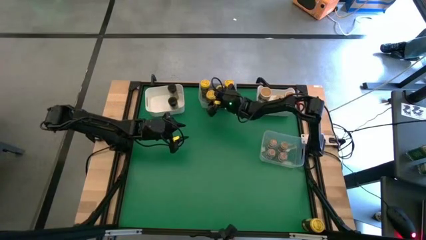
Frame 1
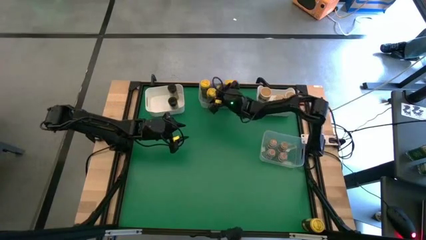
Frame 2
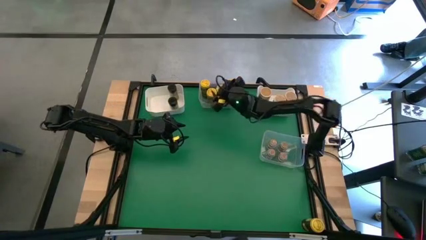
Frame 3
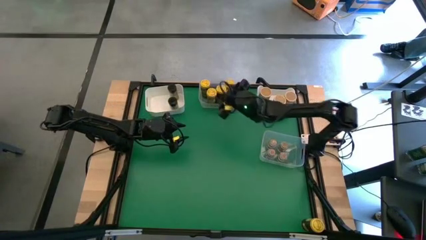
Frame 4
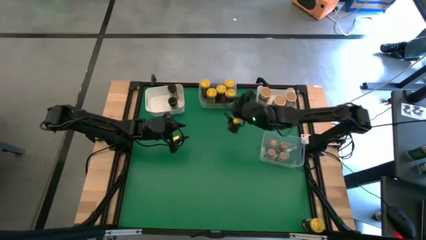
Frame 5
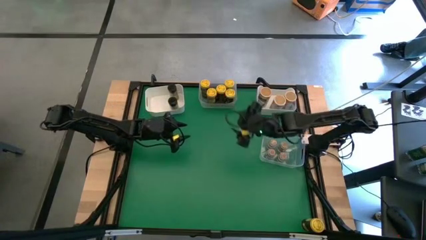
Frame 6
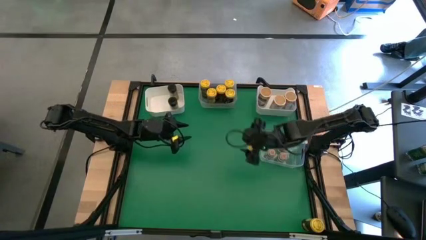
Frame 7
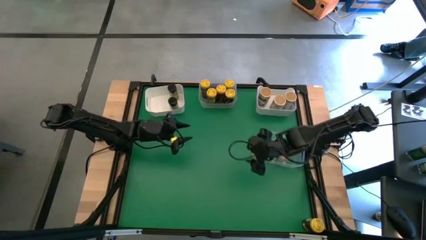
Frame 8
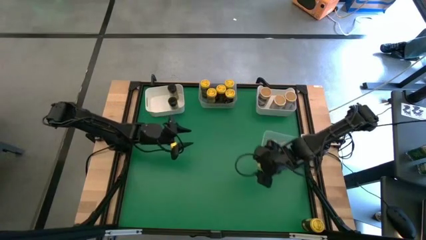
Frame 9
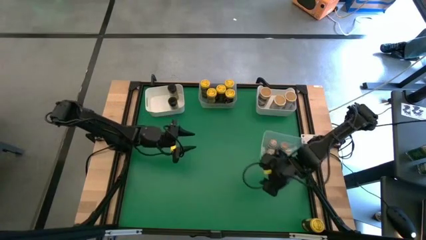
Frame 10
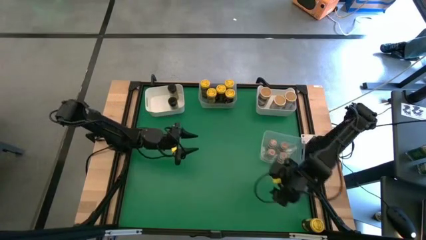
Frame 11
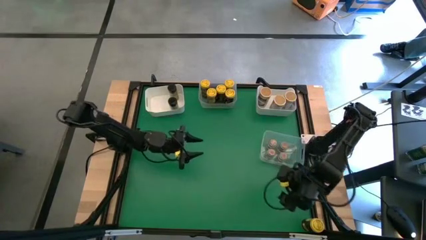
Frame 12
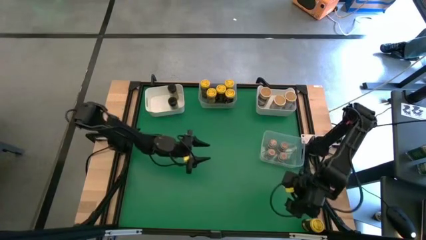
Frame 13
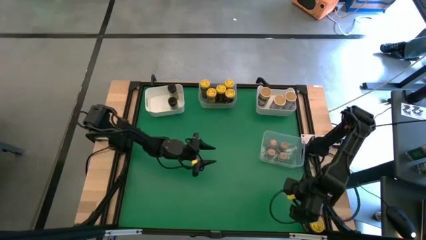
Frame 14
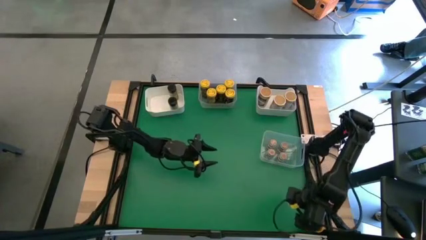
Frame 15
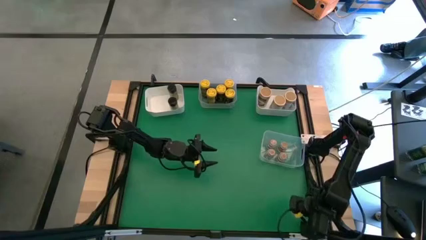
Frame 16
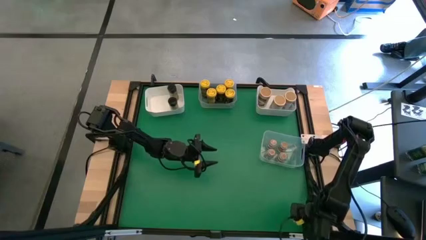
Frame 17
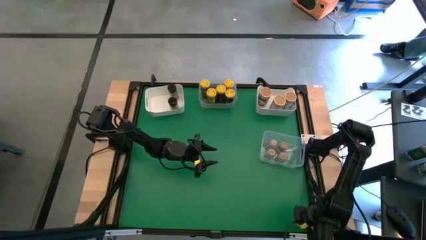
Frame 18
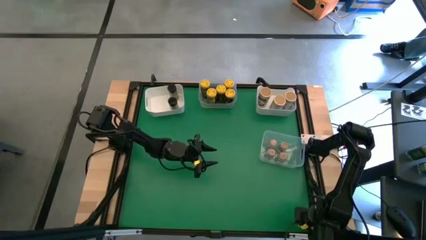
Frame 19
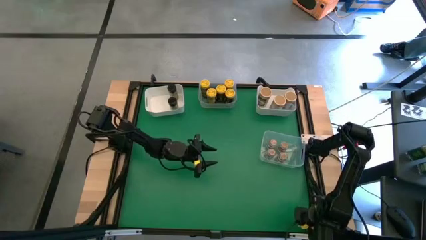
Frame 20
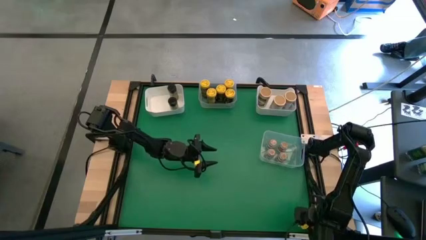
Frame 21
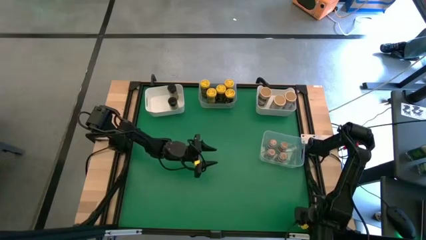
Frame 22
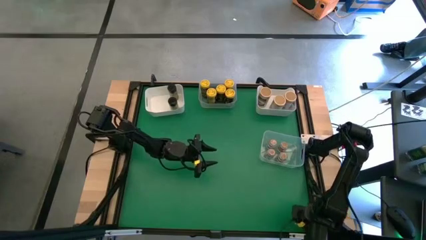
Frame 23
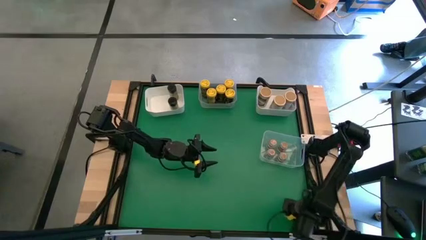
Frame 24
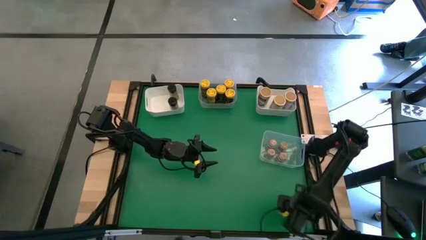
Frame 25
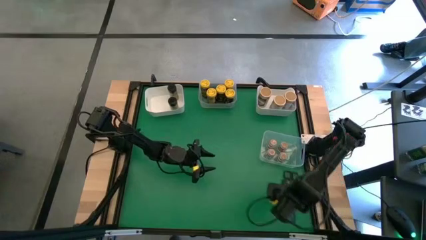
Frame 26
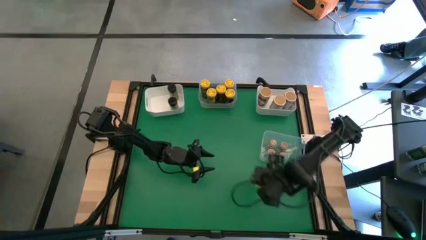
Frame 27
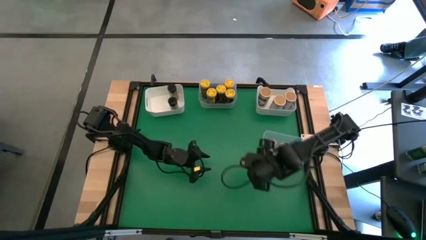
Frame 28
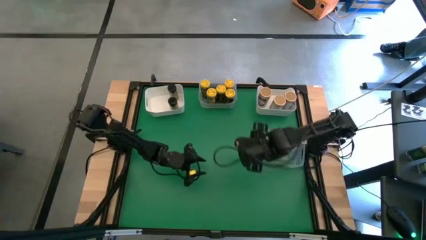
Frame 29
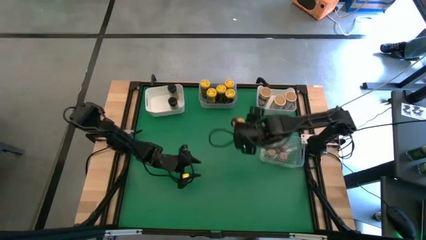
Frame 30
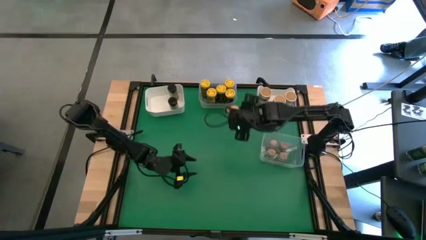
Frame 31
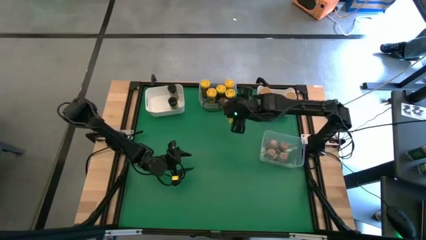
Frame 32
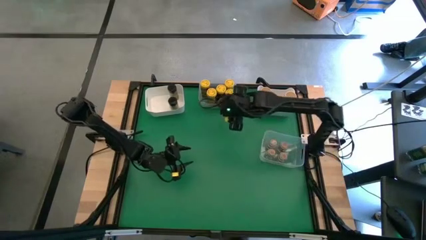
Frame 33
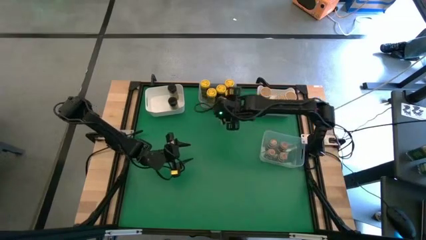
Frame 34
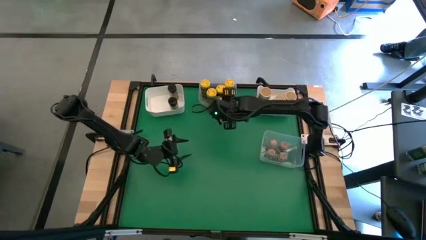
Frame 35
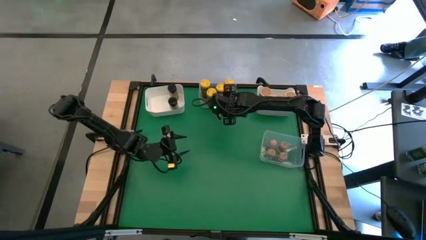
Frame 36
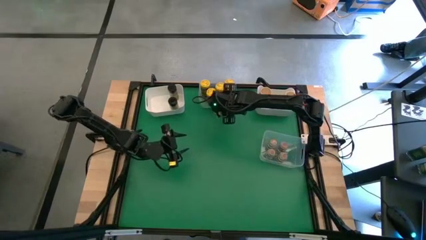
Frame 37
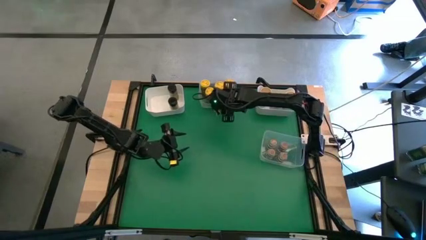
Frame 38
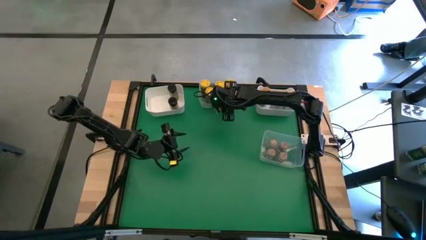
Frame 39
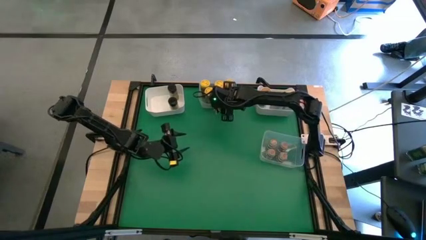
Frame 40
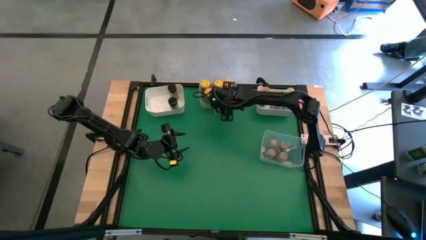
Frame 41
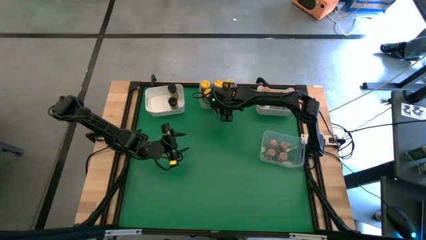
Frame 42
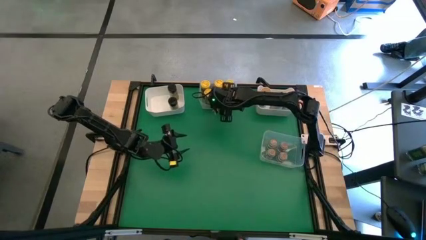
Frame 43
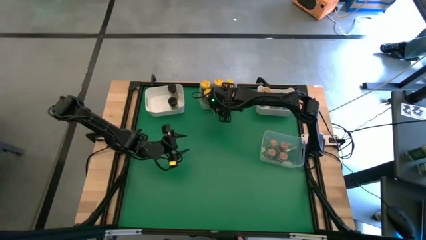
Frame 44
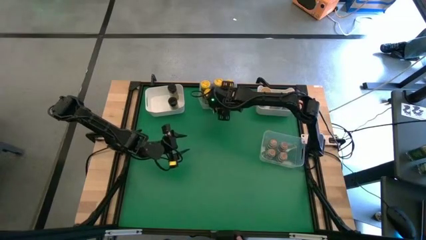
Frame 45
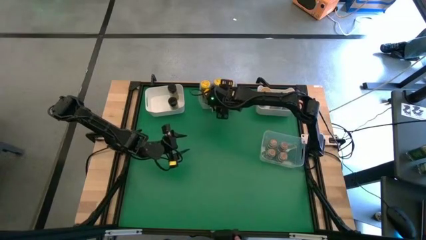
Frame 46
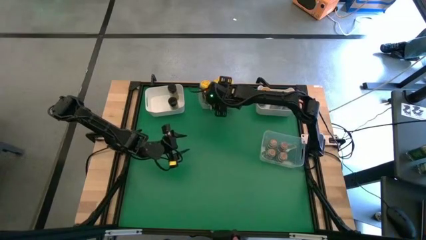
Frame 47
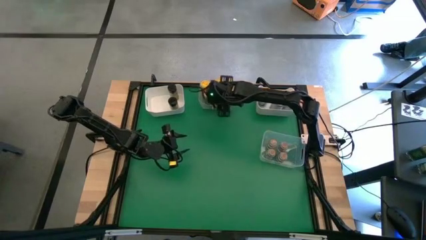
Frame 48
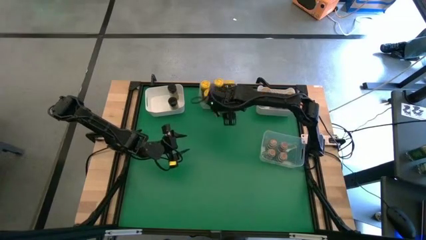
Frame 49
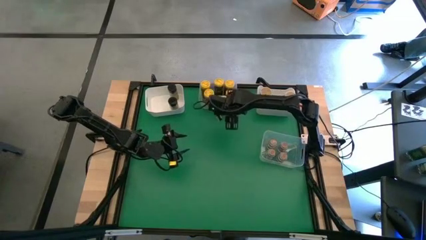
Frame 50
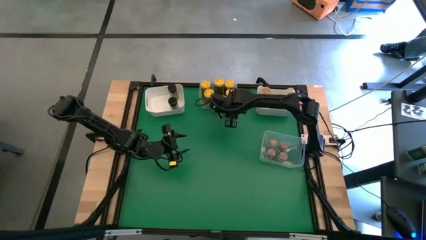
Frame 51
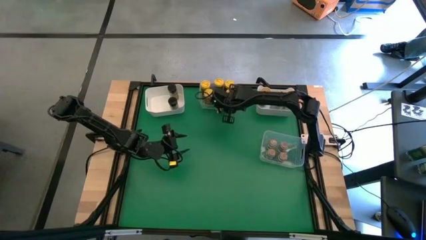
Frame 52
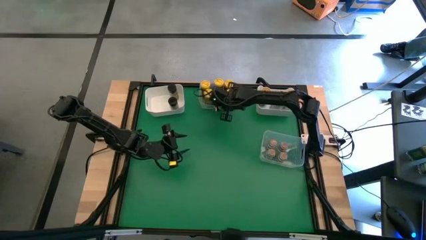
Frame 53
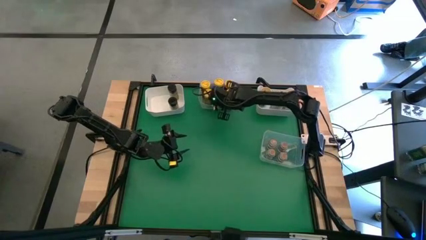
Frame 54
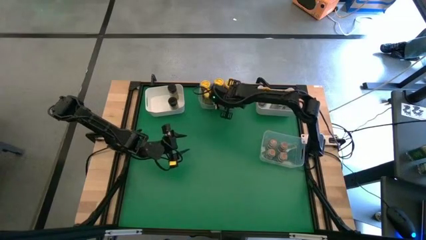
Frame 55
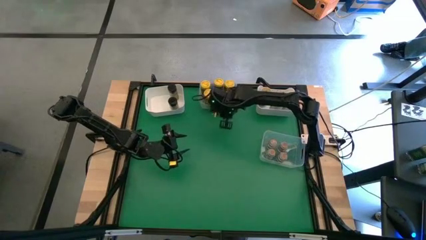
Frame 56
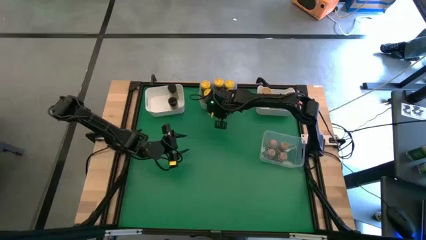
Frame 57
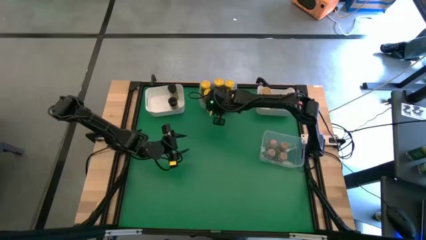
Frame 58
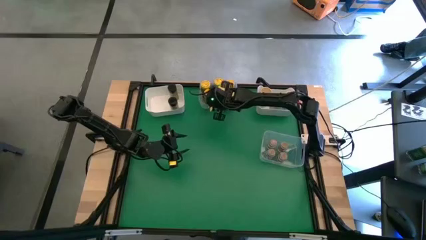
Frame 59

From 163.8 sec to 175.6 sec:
Task: Sort spices by type
Put the yellow seasoning bottle into the top transparent bin

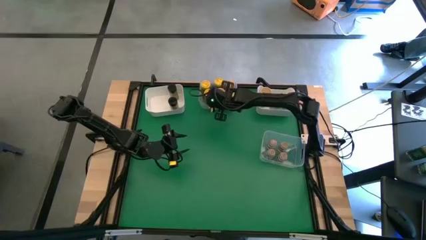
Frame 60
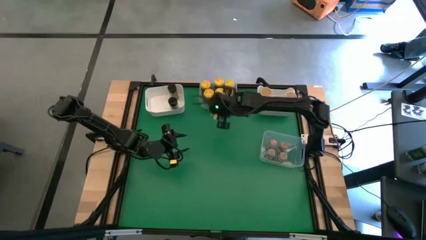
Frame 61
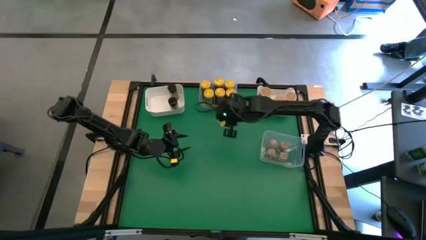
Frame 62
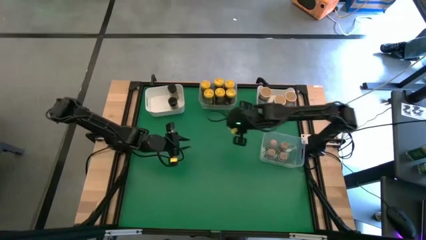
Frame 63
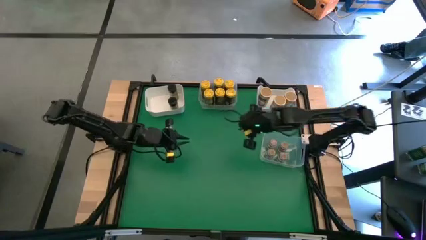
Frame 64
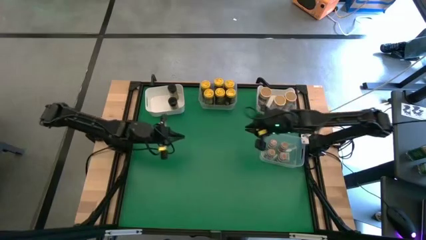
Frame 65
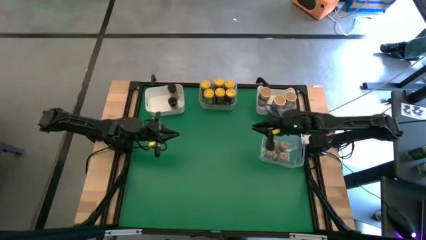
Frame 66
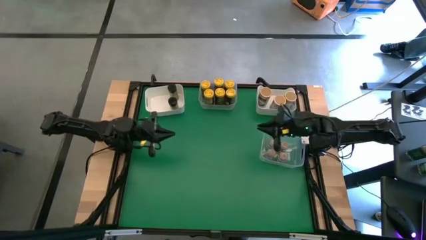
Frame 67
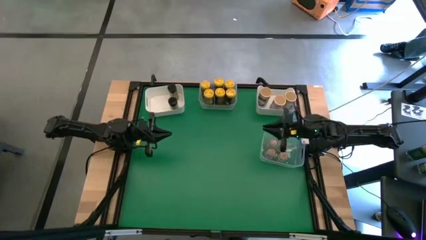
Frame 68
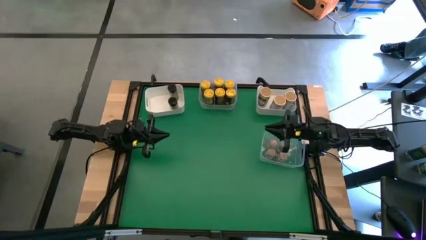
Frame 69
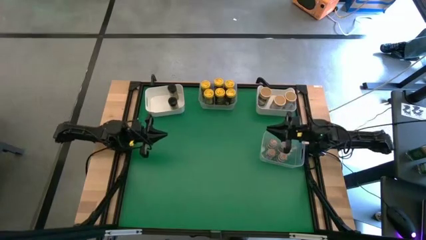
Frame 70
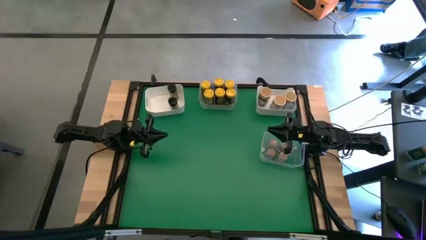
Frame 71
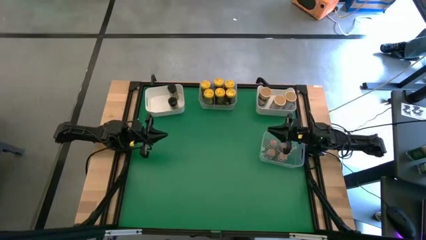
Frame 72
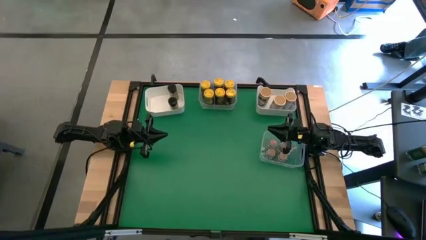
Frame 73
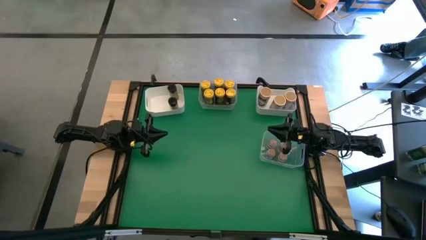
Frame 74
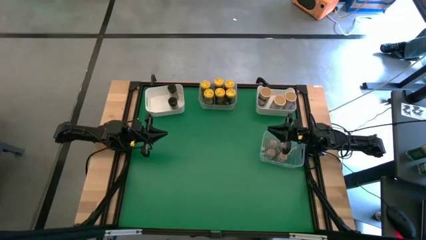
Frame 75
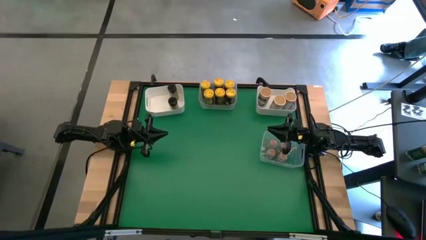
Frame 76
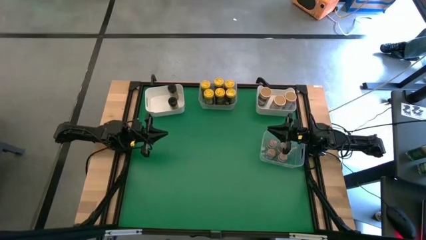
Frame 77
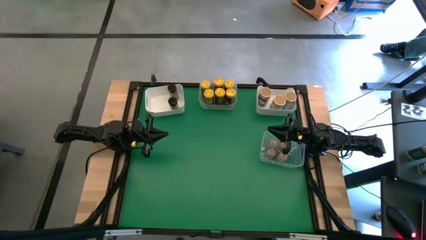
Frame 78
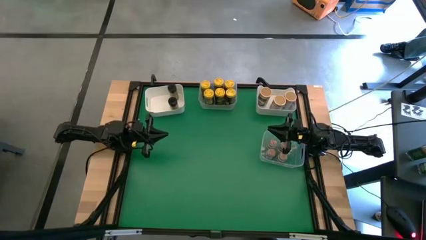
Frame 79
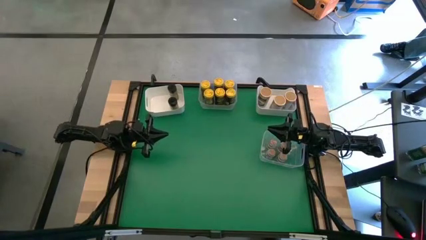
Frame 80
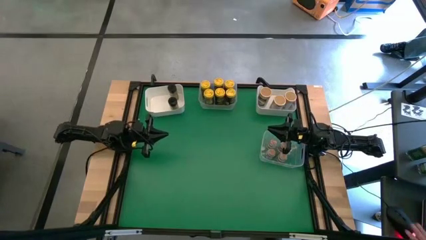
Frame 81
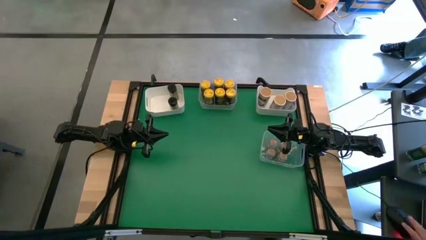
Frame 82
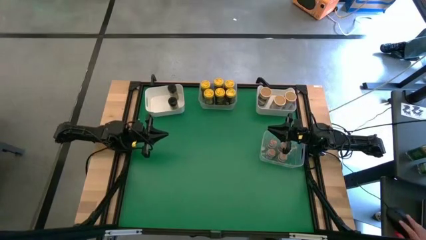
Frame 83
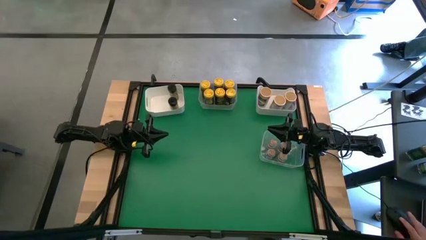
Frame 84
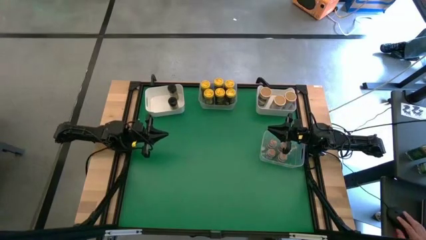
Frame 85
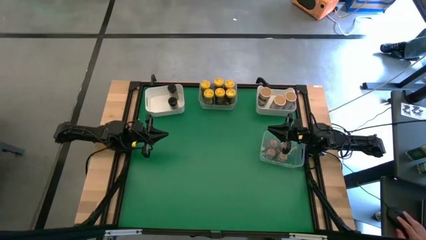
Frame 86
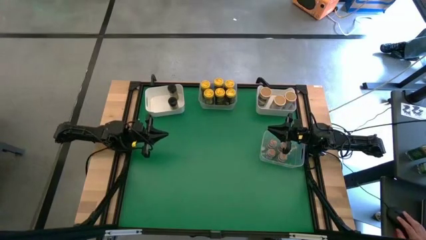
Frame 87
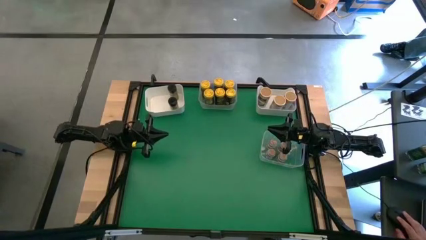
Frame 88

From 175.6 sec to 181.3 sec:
Return to Home Position
